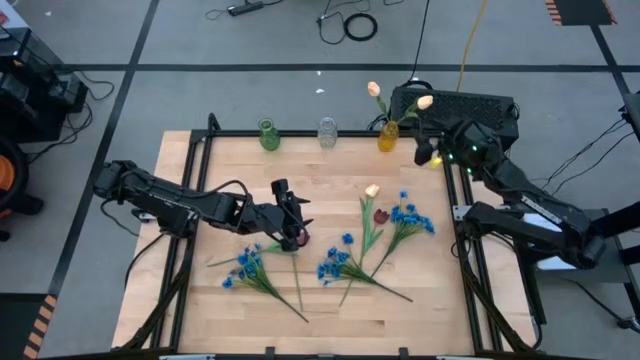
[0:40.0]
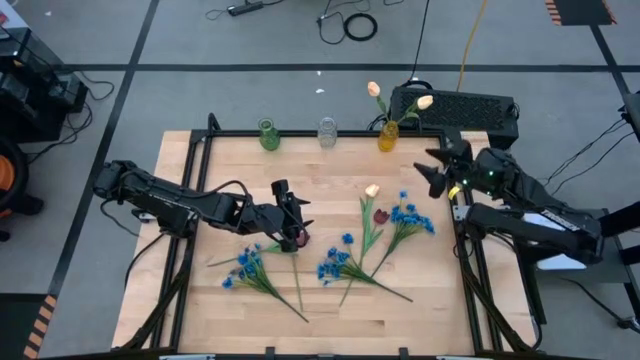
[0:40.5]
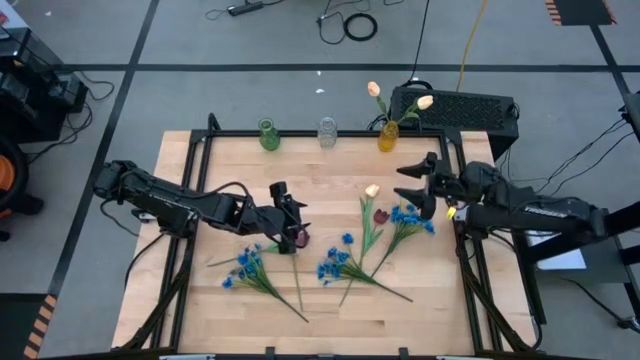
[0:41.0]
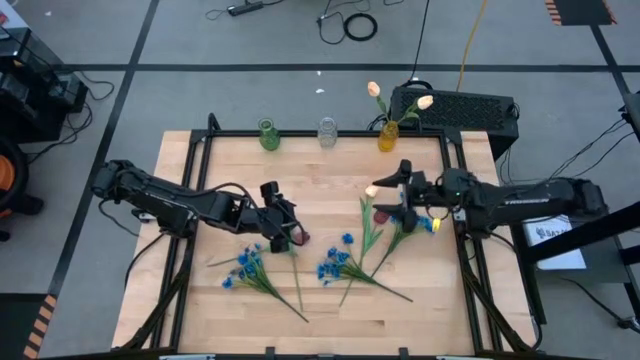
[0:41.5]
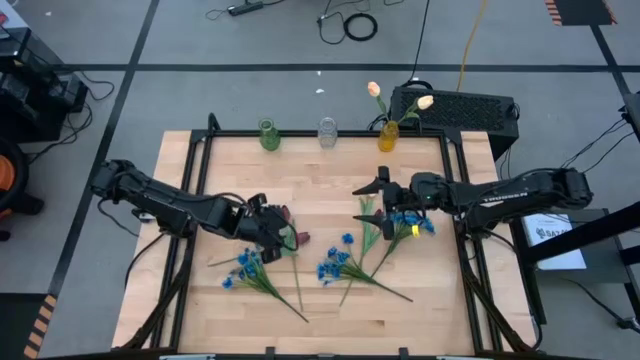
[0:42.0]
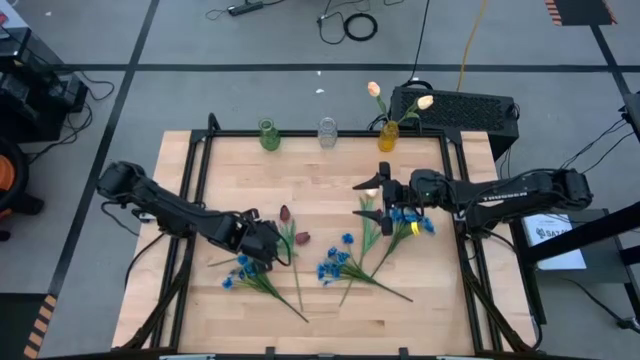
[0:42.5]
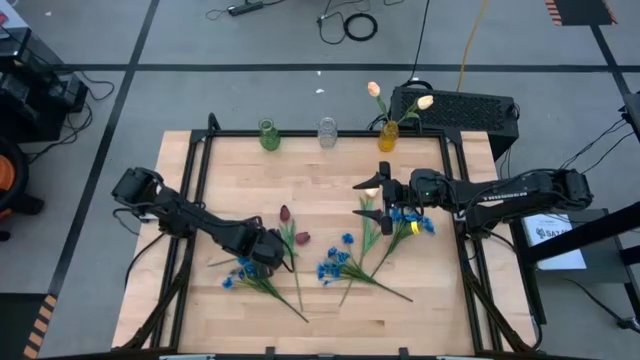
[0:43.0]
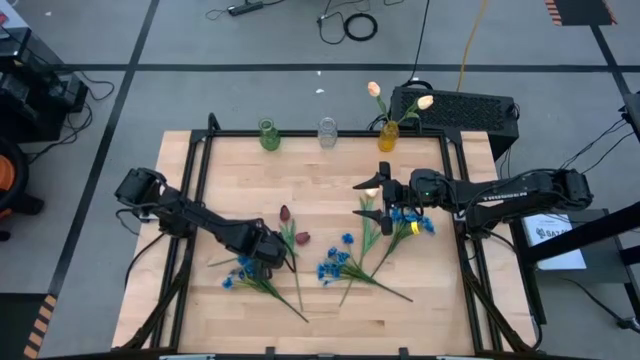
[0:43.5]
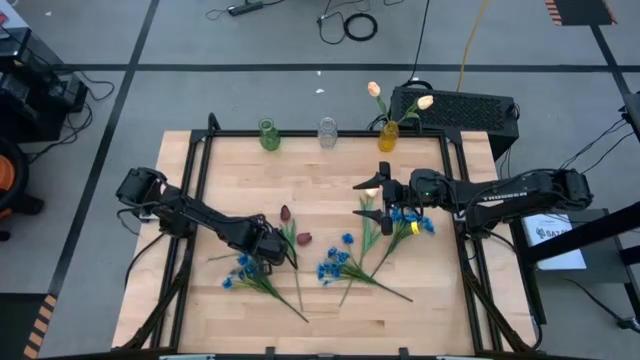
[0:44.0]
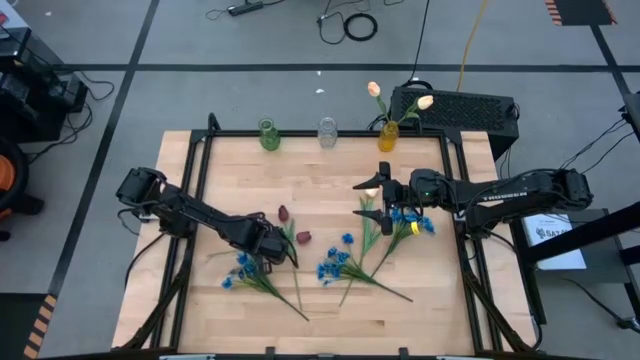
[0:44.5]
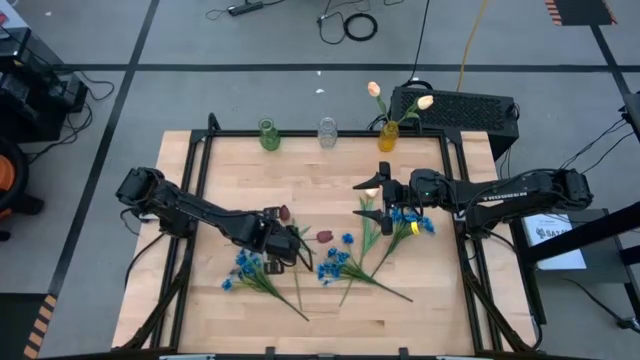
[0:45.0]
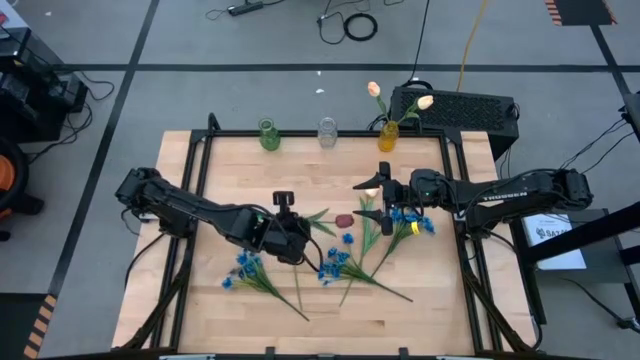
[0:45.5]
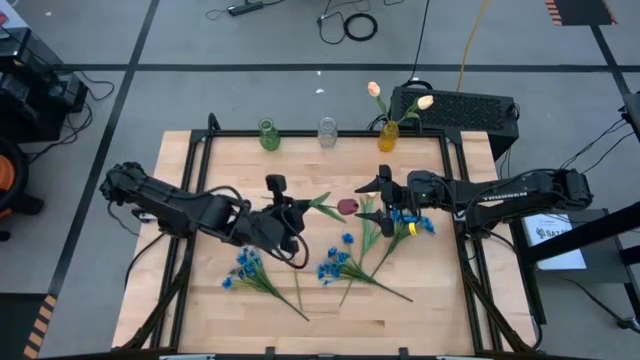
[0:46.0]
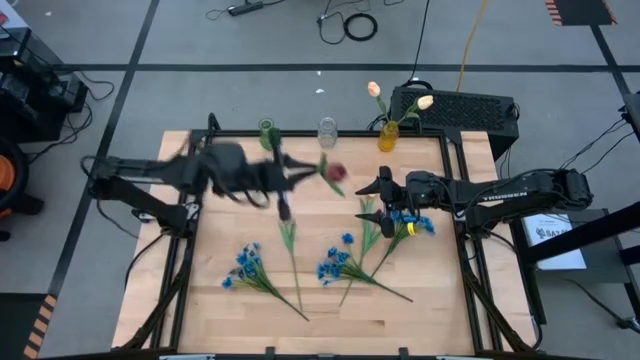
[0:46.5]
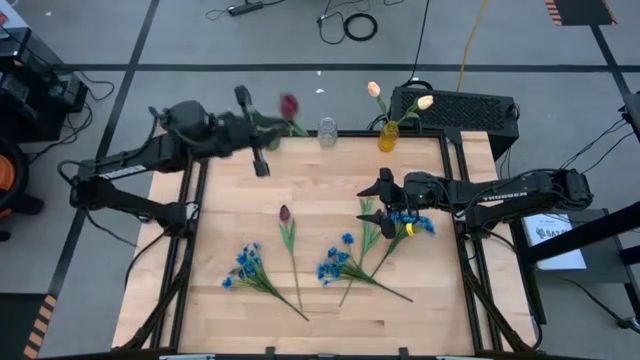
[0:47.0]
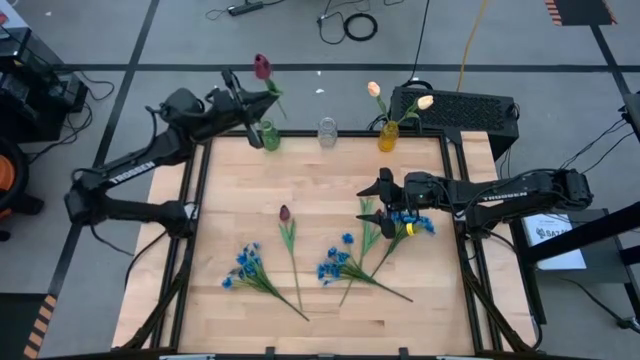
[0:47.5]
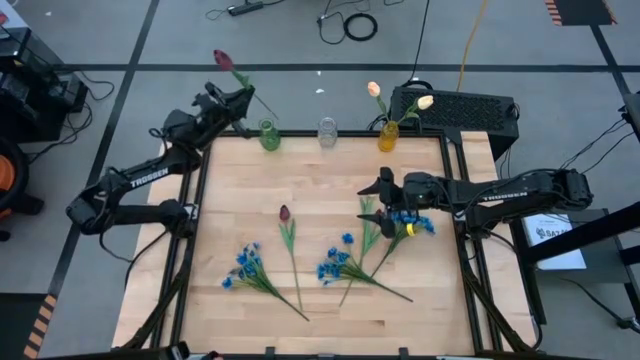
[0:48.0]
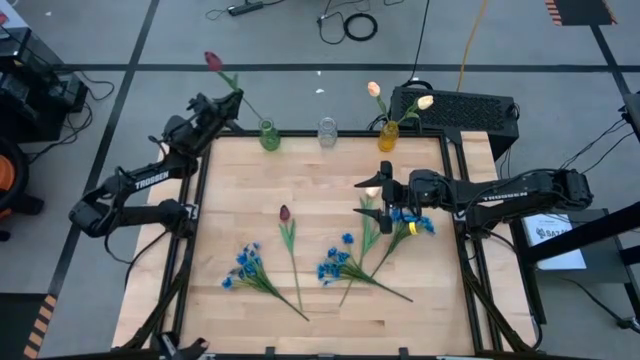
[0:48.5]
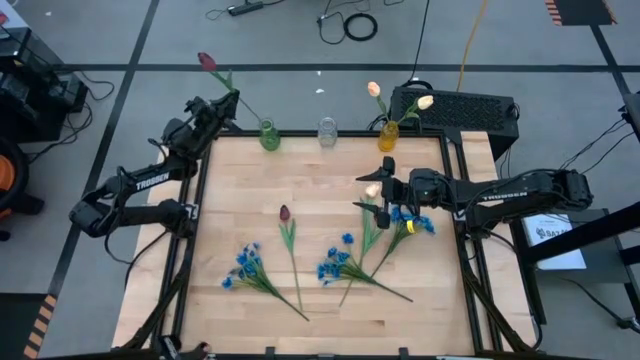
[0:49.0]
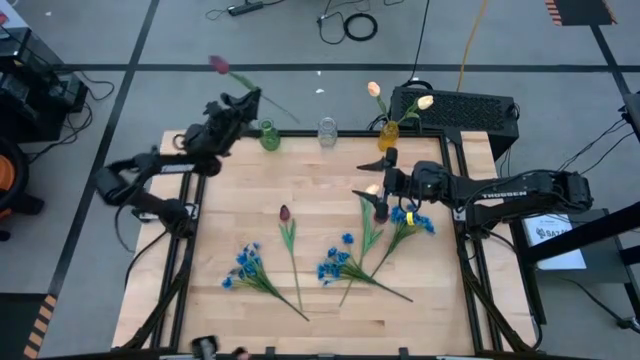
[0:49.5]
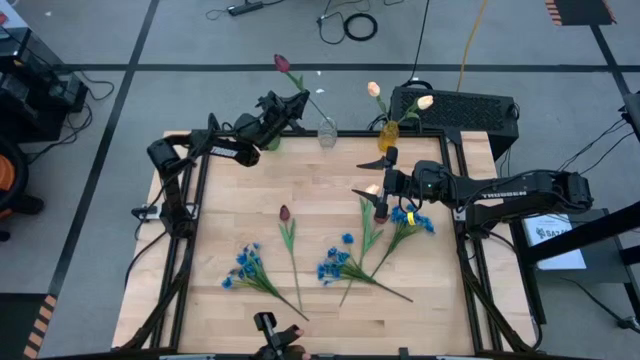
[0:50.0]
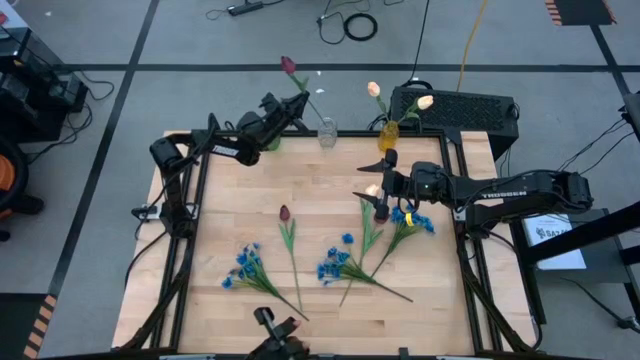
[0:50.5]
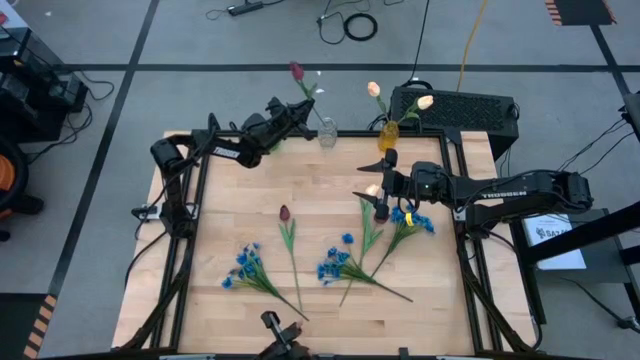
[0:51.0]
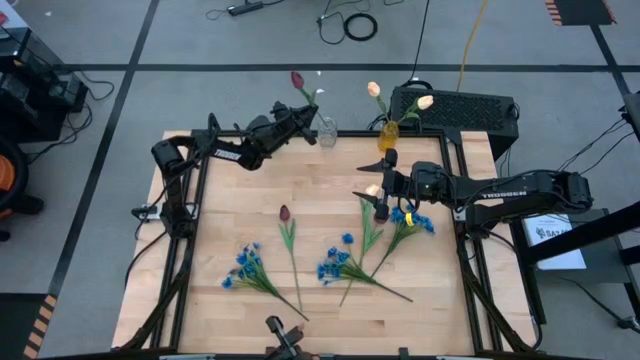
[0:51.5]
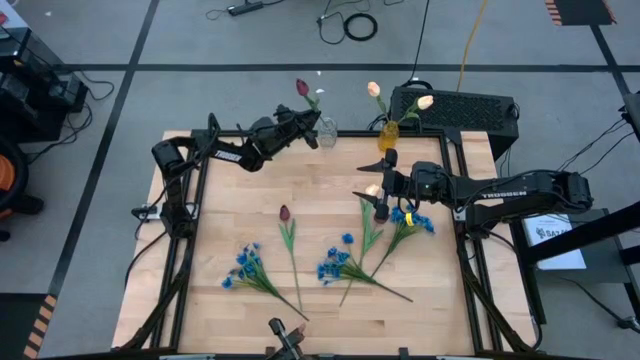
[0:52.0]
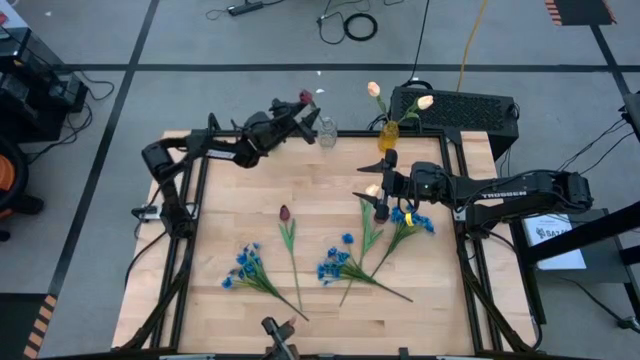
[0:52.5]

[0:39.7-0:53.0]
Task: Sort flowers into vase by color
Put the left red tulip into the transparent vase

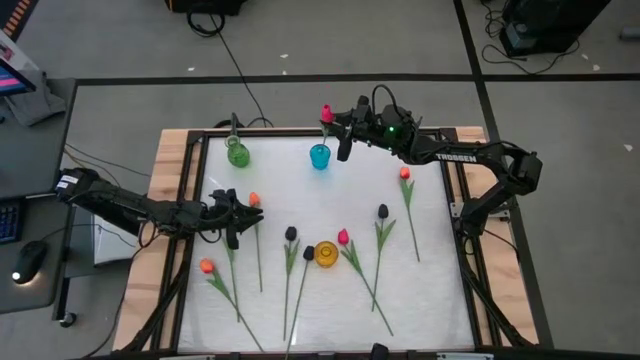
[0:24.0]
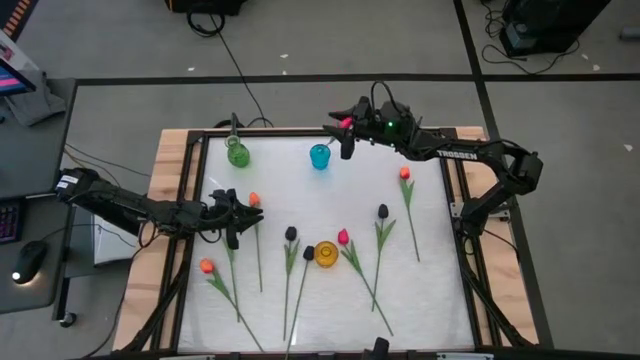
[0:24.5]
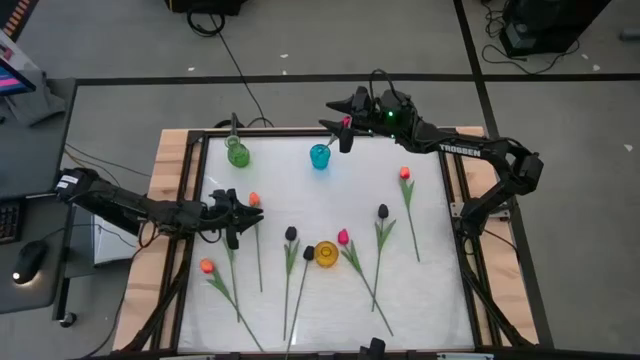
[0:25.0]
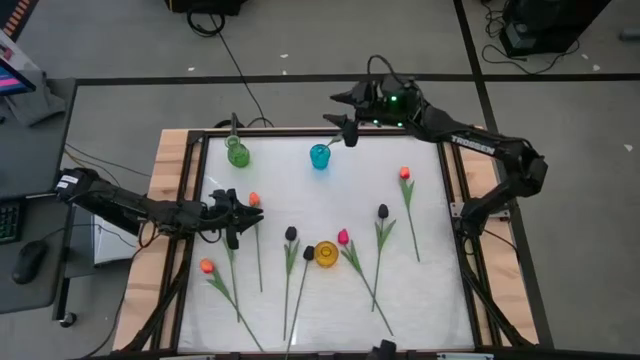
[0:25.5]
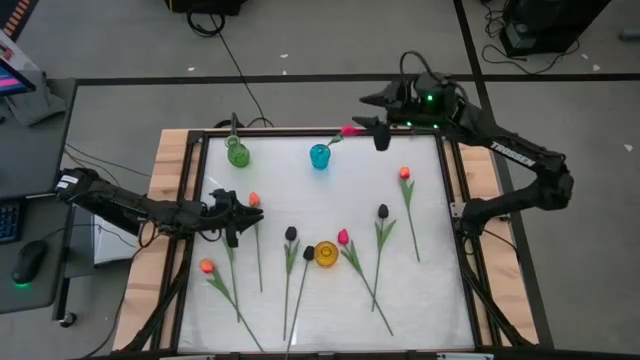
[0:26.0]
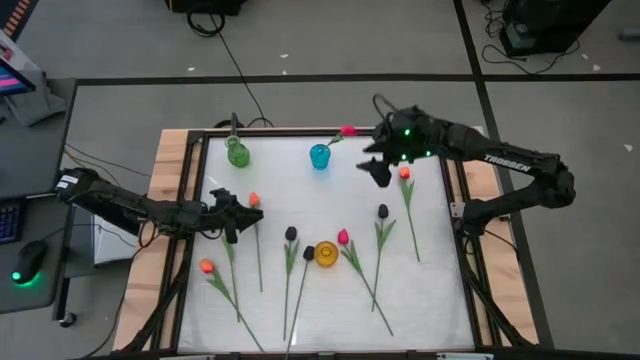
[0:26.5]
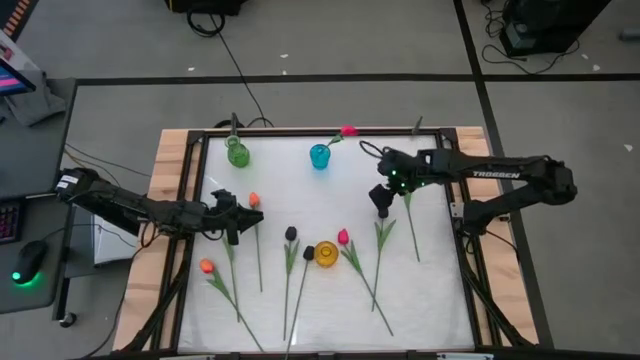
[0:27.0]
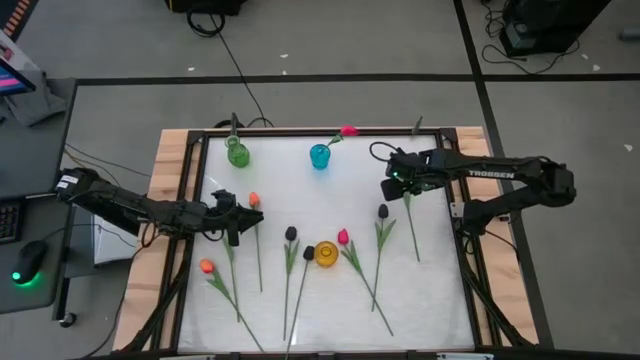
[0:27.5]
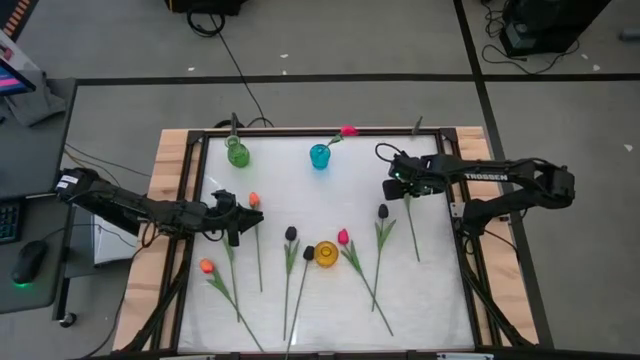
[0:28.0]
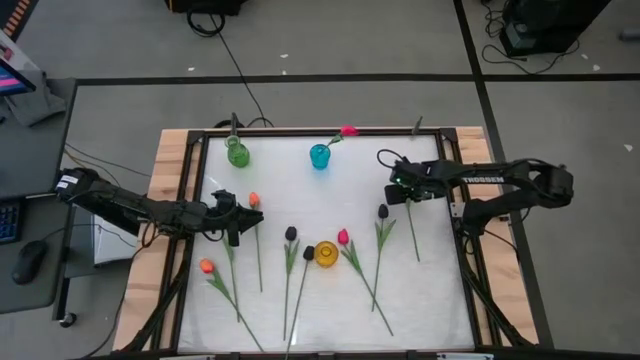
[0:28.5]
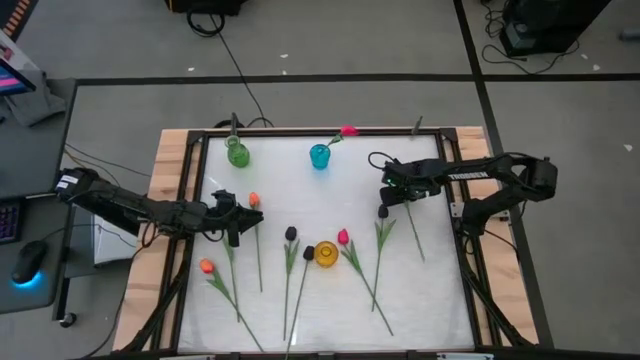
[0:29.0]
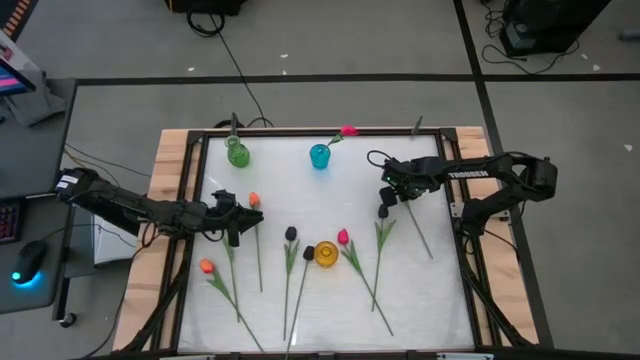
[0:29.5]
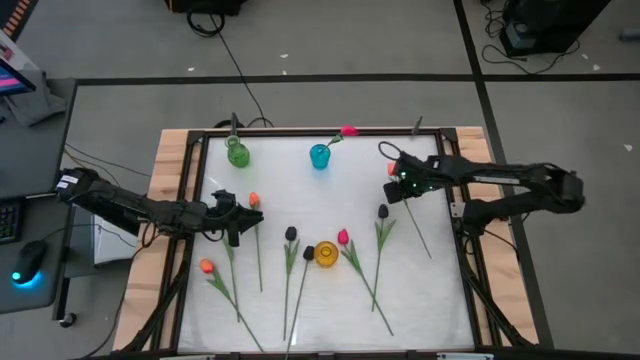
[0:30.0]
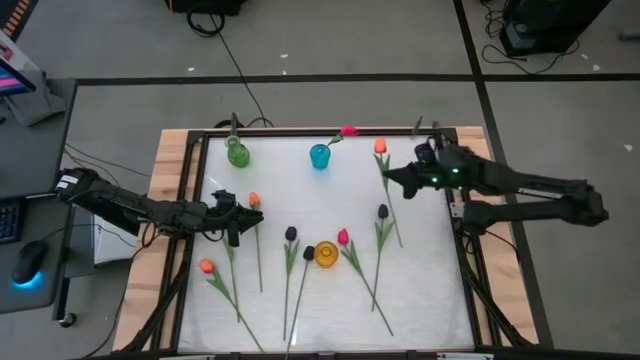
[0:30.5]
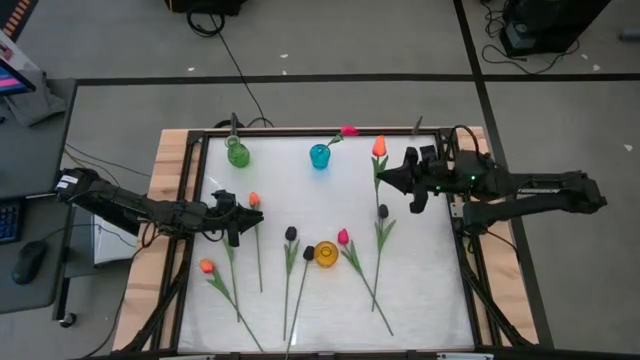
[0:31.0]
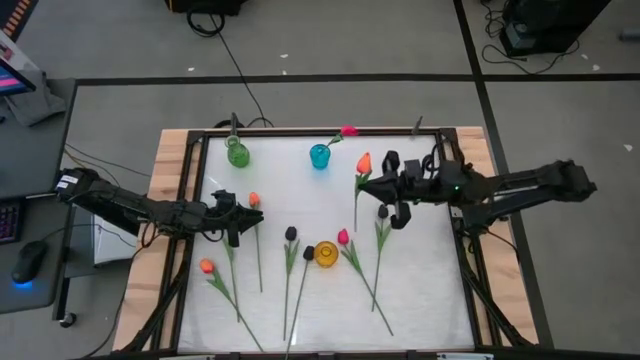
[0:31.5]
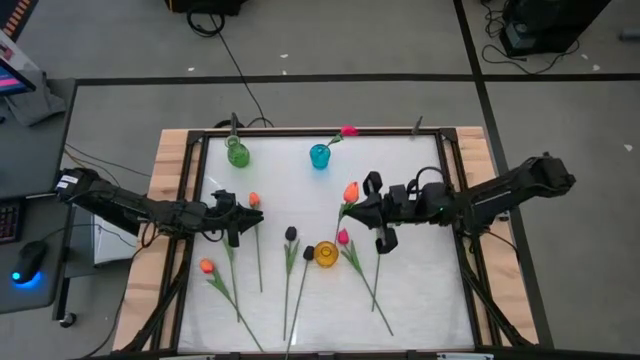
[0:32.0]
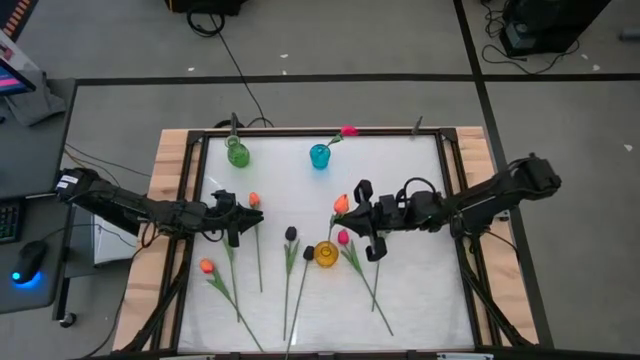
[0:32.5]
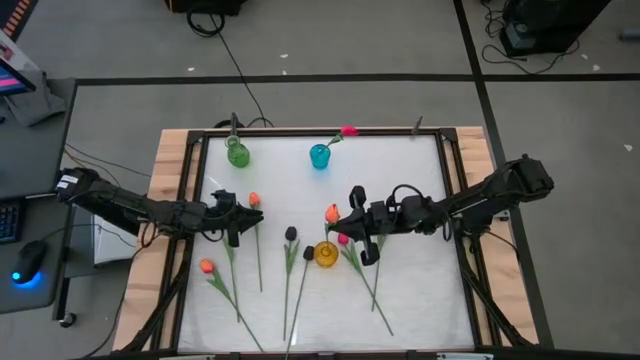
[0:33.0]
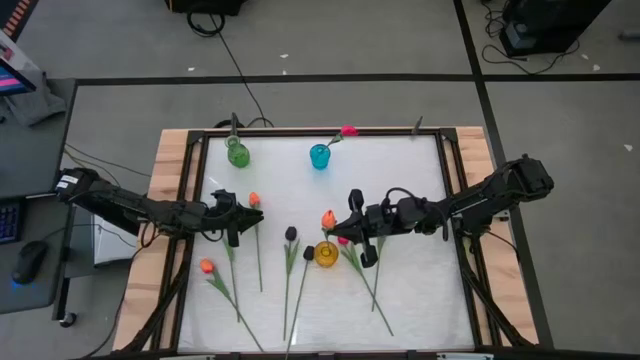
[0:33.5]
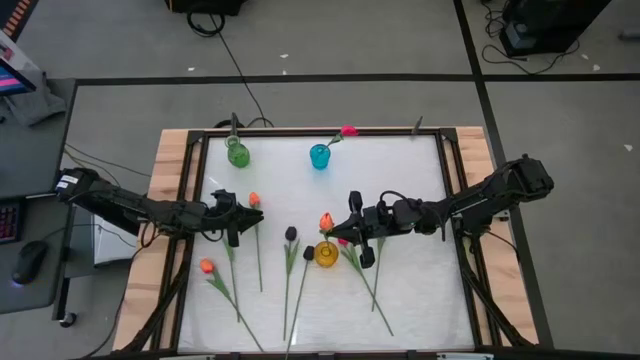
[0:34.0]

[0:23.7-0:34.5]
Task: Sort flowers into vase by color
Put the right orange flower into the yellow vase
